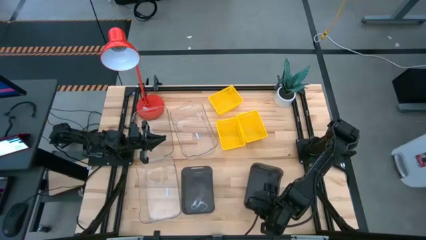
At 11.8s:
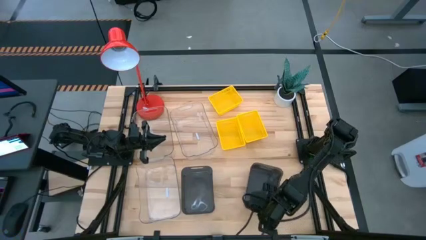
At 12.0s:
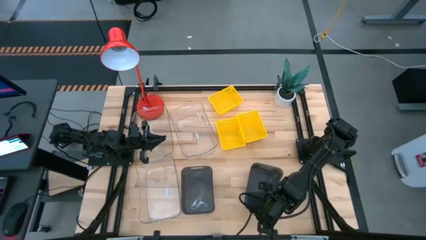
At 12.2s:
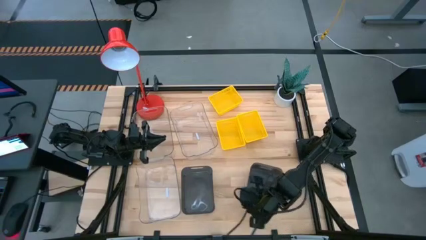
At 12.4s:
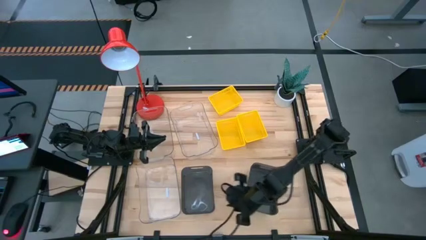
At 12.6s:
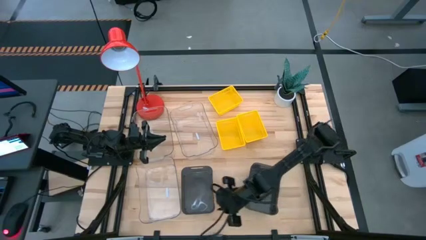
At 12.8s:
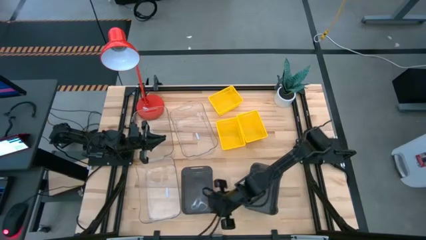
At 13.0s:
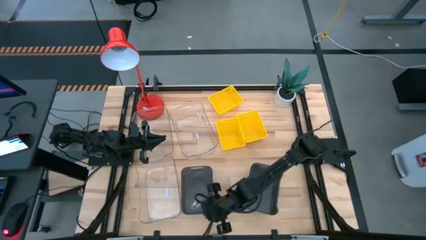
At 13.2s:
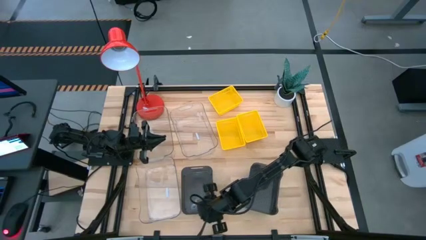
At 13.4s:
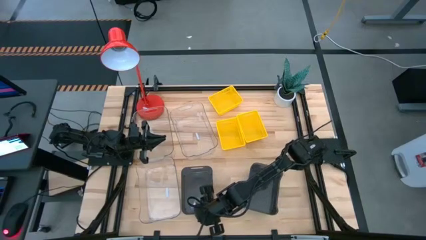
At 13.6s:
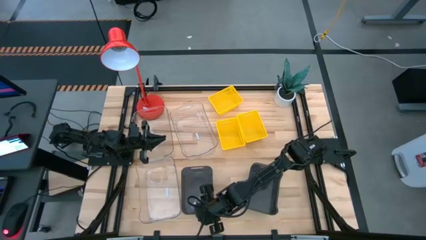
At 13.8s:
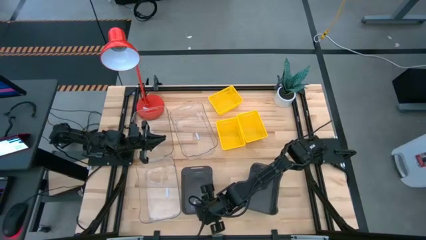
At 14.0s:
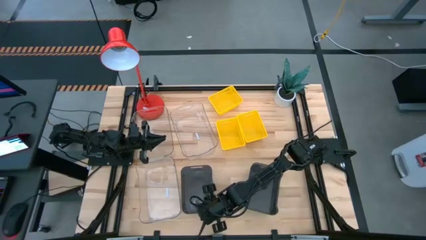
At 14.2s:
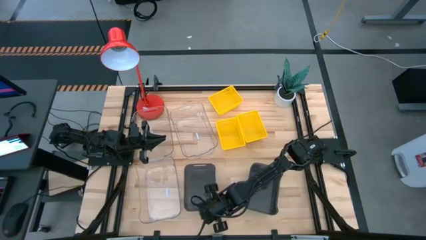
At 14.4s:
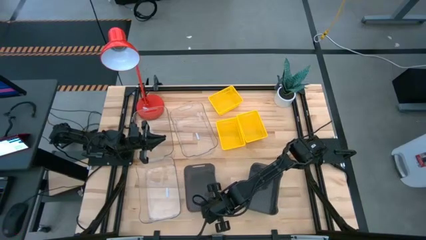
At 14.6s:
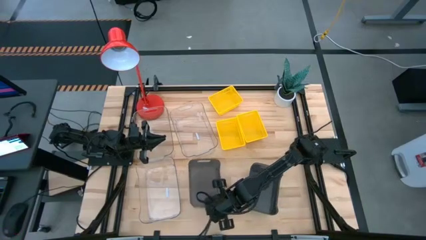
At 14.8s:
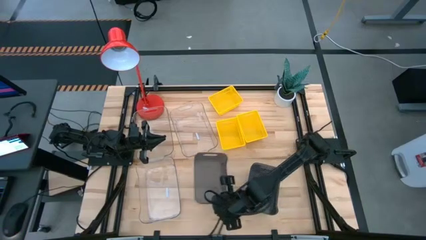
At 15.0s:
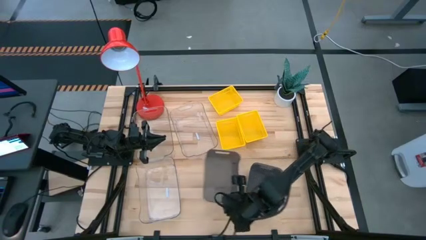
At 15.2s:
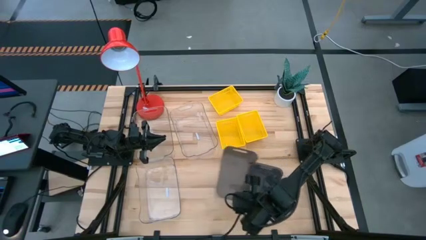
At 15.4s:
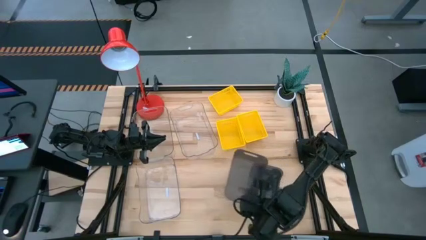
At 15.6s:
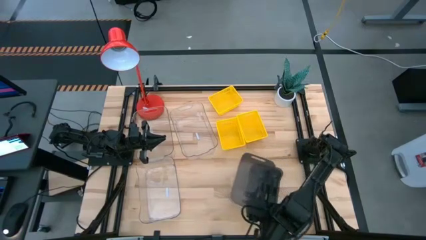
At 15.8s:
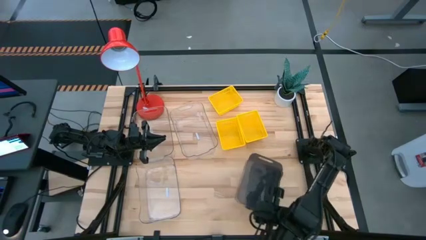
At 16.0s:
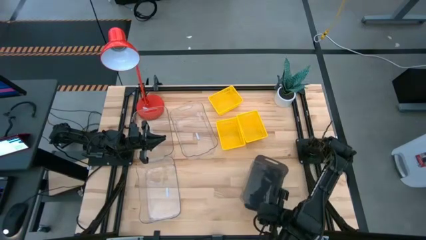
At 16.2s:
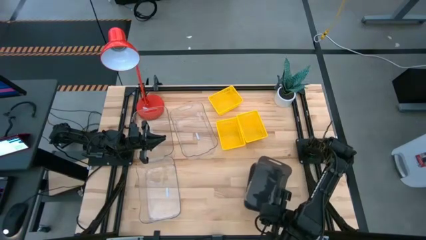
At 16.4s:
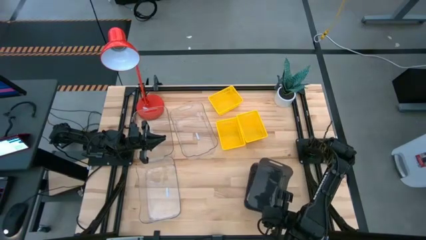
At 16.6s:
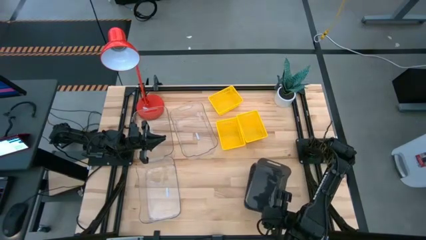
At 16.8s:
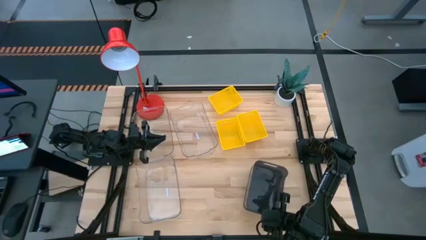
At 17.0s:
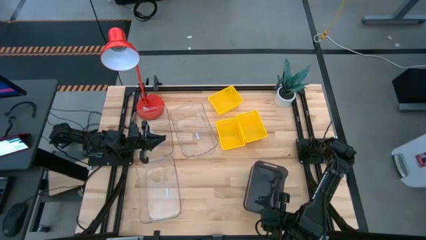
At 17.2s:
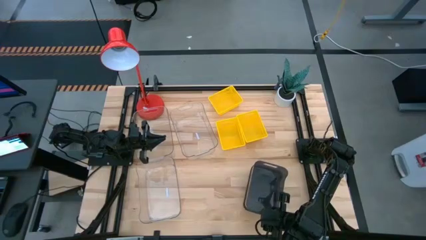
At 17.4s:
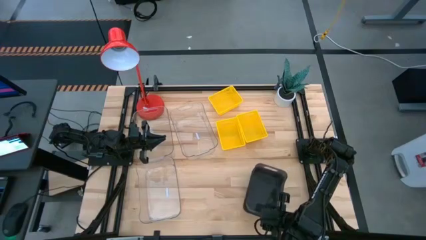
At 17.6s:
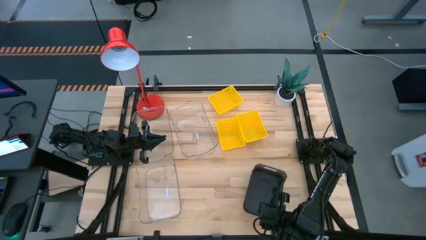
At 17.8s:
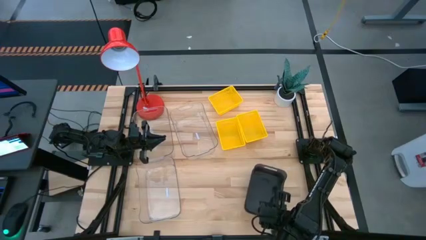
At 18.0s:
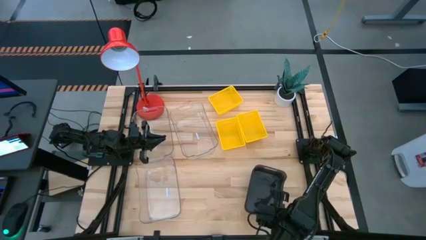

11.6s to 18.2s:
Stack the left black bin on the black bin

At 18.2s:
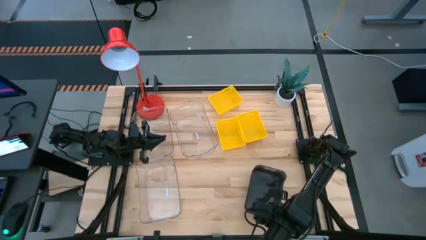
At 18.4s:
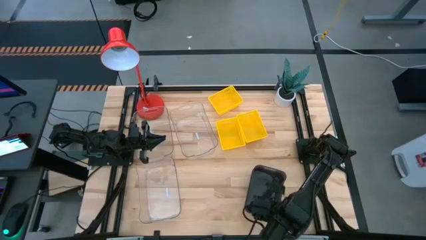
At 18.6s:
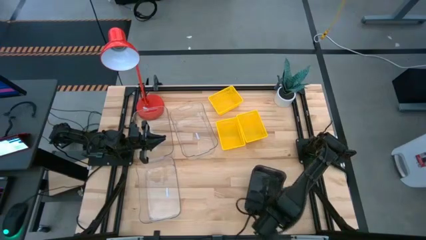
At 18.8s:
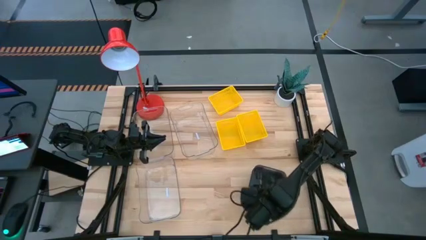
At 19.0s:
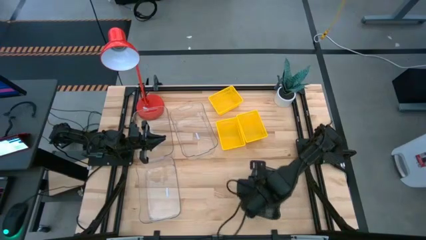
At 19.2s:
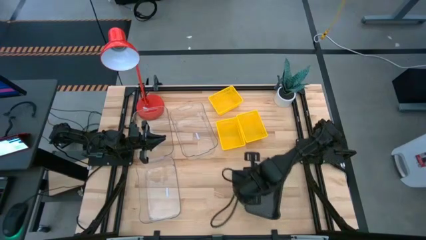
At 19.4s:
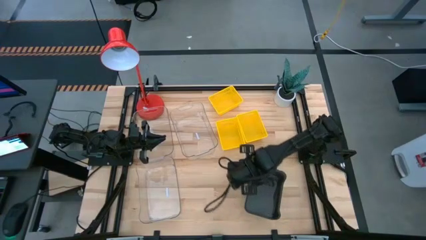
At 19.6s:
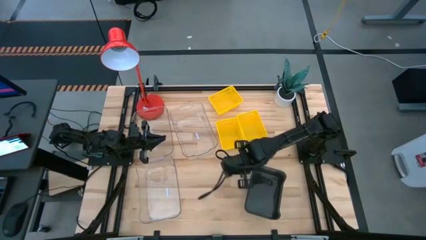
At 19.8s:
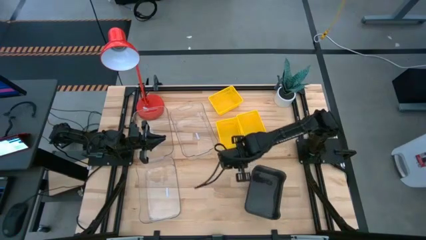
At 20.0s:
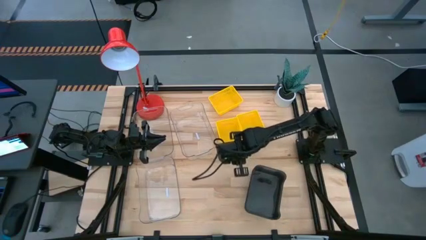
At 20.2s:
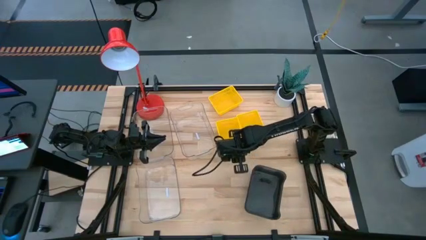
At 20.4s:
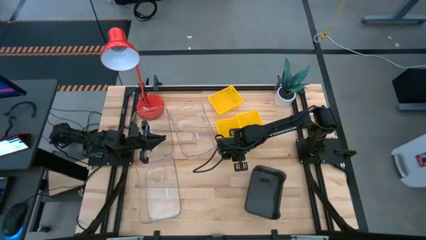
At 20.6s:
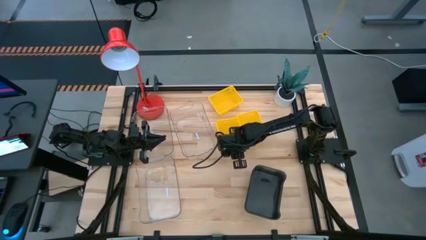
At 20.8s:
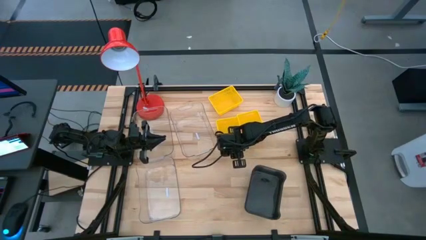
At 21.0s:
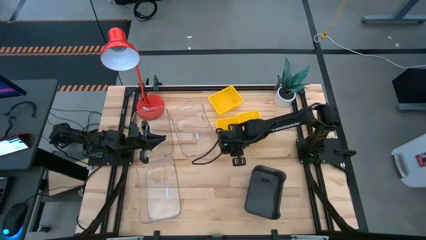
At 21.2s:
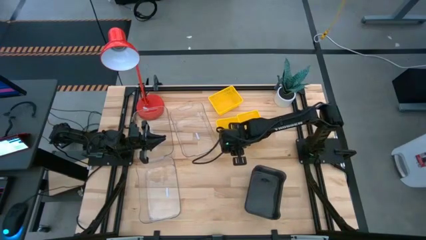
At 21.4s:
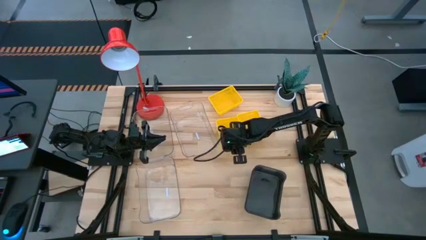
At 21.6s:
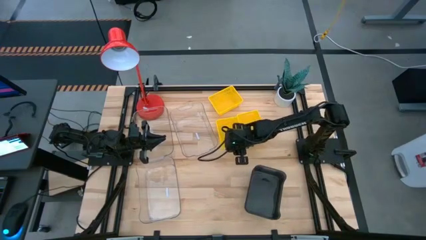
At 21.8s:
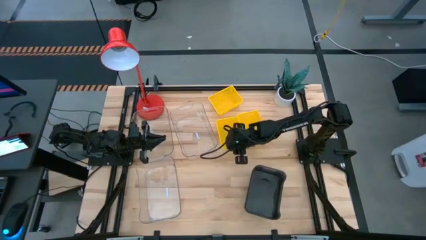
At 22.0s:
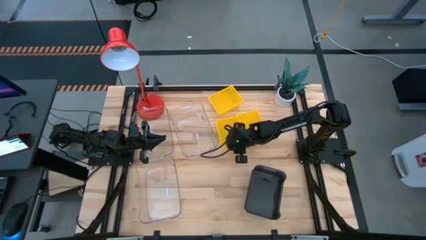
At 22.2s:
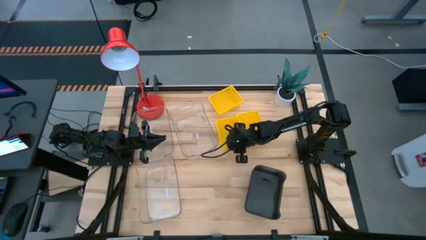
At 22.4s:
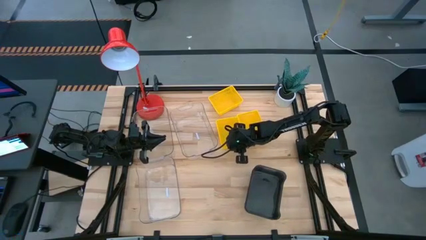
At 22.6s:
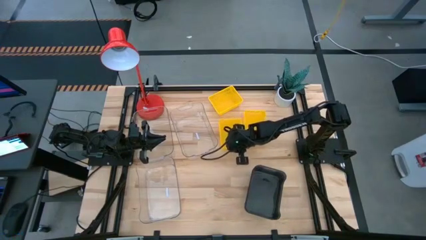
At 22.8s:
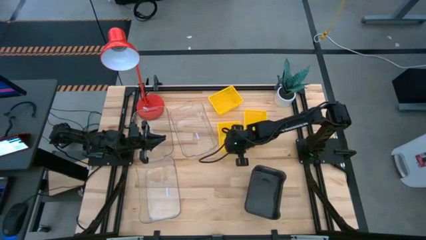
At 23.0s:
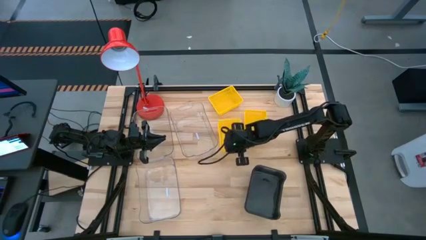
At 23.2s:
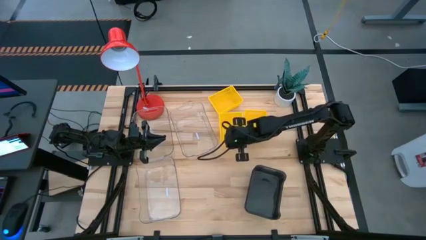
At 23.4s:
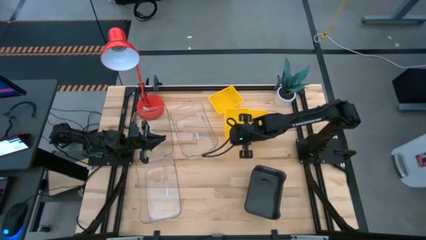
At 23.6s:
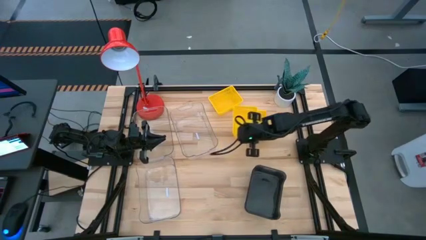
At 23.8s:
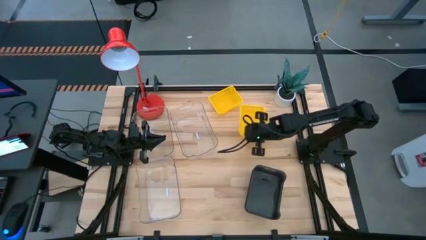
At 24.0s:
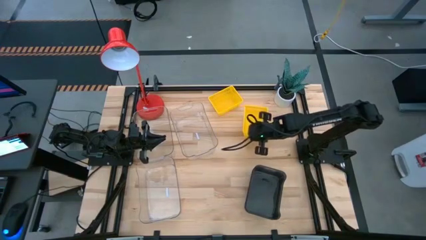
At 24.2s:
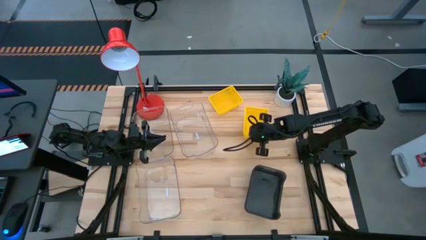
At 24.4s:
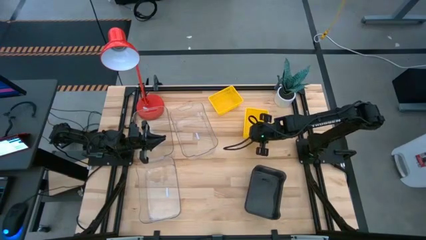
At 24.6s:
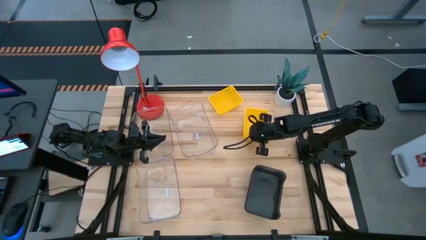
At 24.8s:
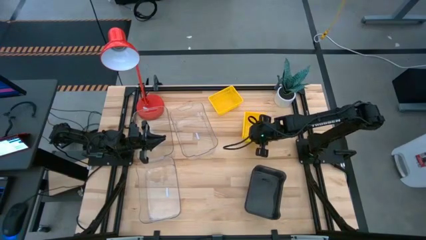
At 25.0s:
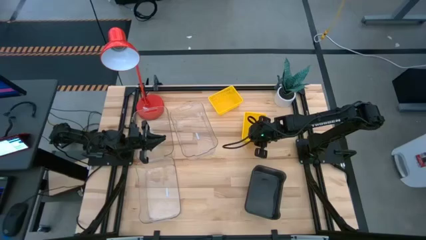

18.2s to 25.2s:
Stack the bottom left yellow bin on the right yellow bin

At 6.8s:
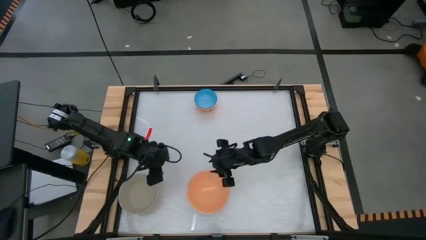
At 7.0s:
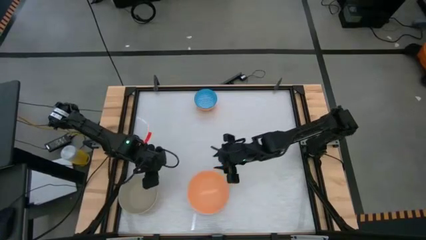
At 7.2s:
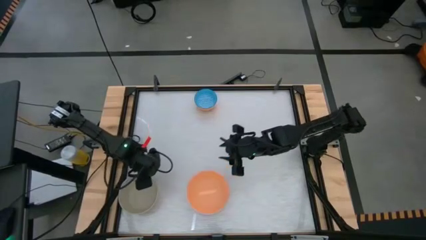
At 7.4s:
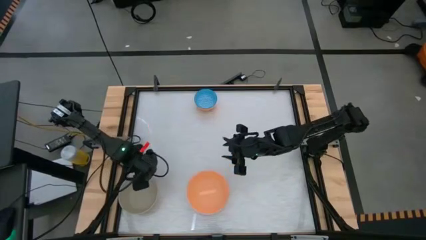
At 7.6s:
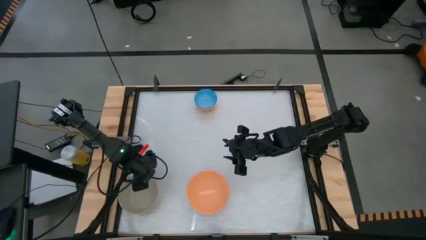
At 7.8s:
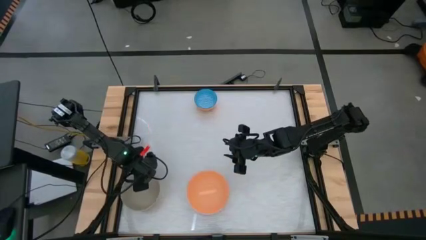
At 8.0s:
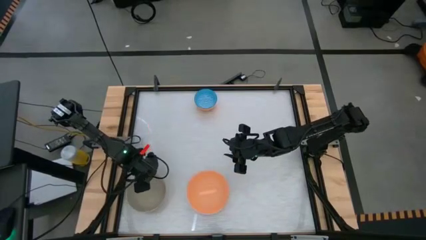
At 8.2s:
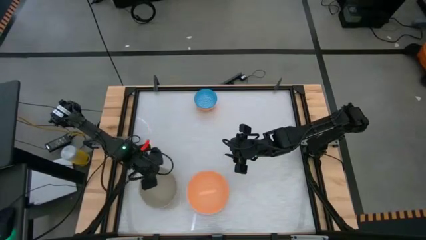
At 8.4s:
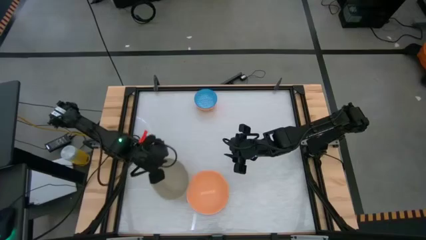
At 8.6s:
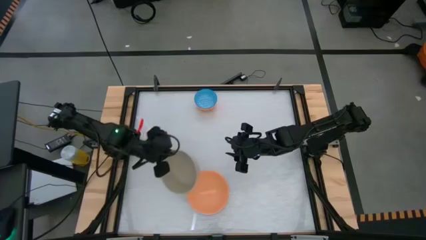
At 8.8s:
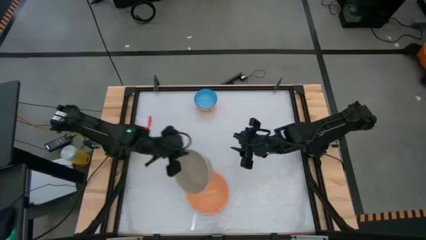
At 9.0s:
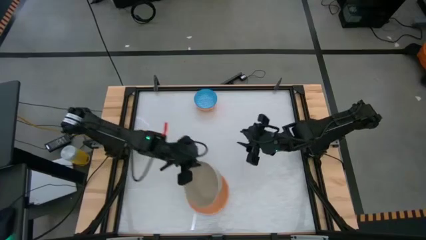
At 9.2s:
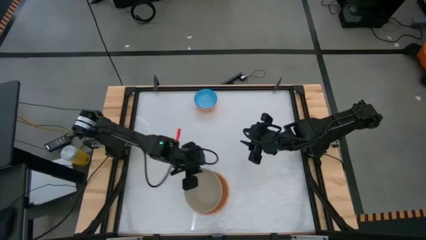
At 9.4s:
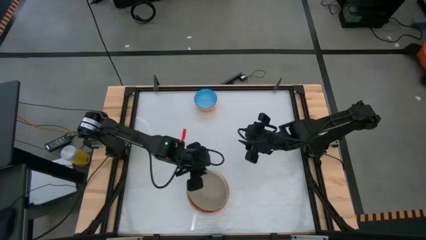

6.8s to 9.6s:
Stack the gray bowl on top of the orange bowl
